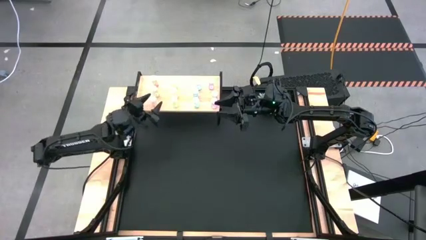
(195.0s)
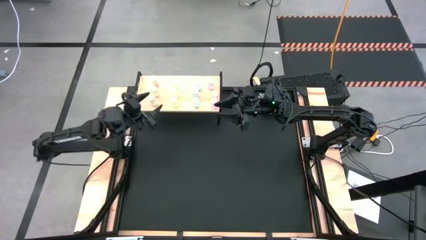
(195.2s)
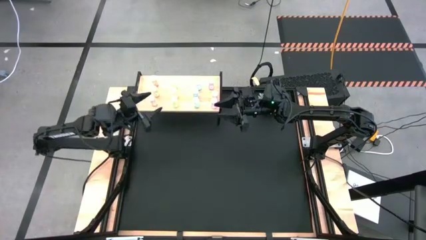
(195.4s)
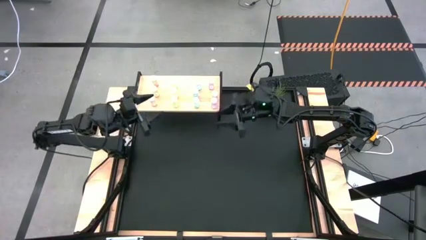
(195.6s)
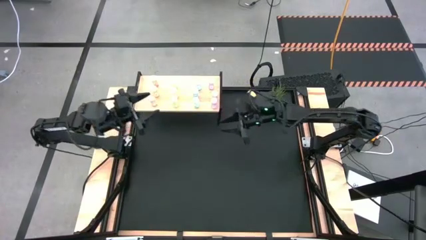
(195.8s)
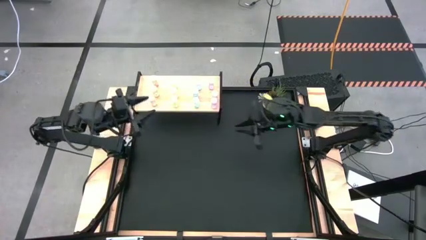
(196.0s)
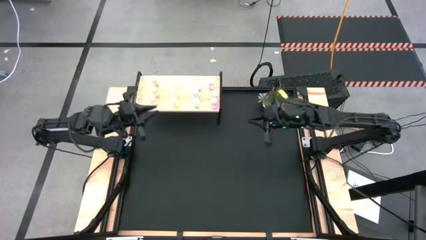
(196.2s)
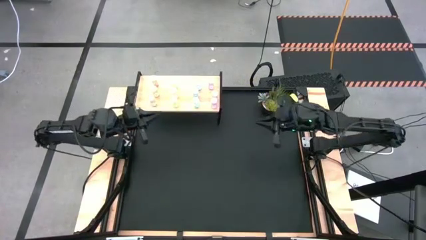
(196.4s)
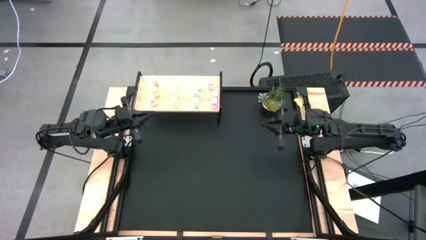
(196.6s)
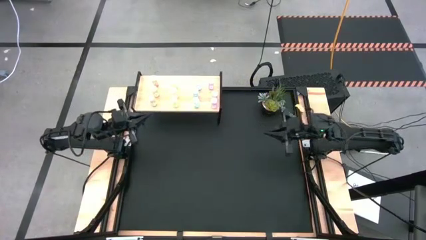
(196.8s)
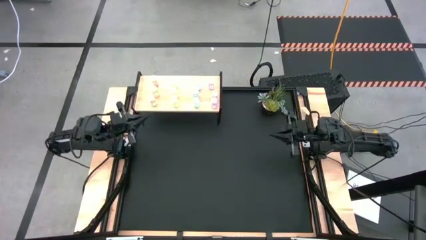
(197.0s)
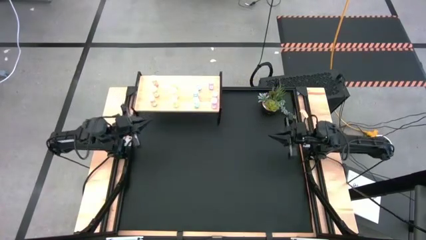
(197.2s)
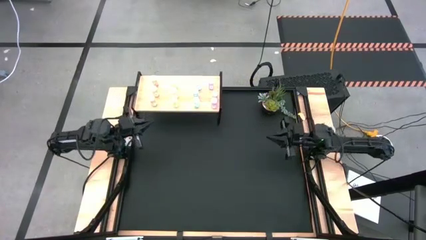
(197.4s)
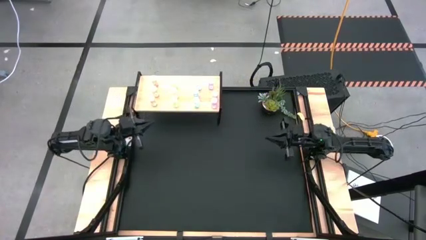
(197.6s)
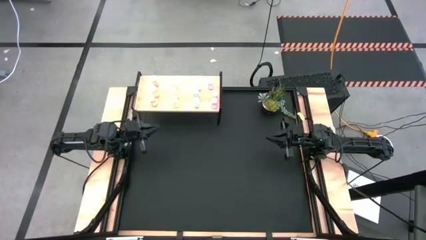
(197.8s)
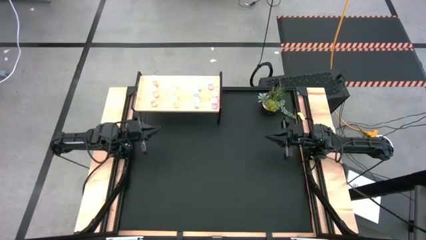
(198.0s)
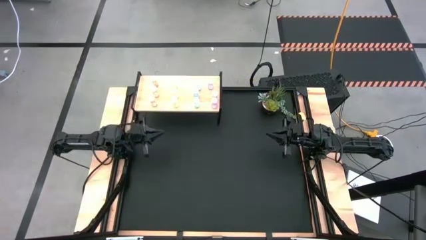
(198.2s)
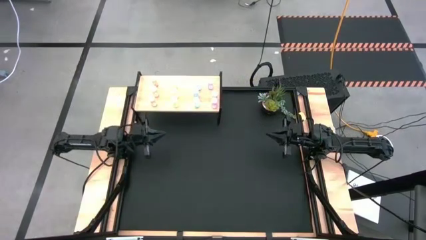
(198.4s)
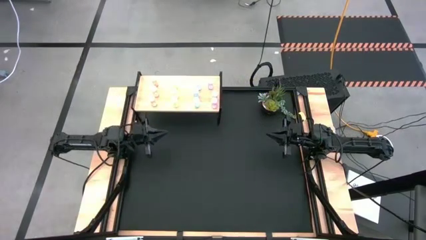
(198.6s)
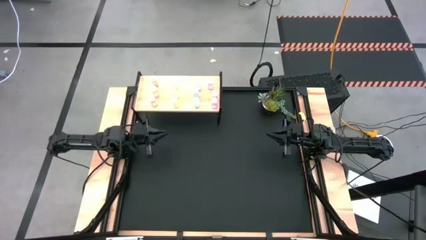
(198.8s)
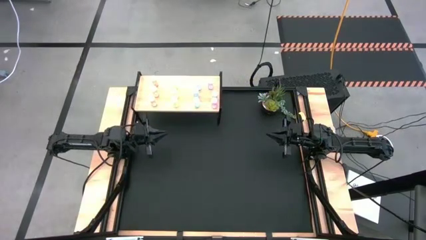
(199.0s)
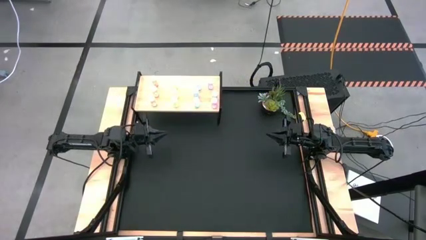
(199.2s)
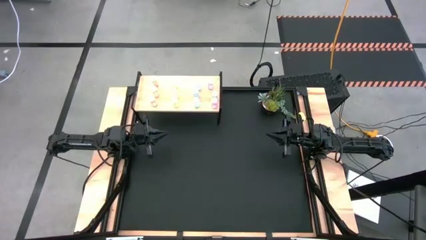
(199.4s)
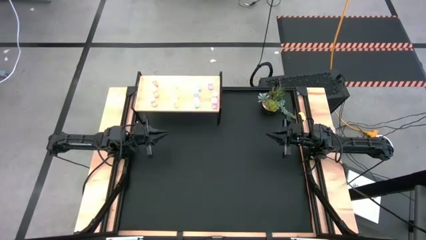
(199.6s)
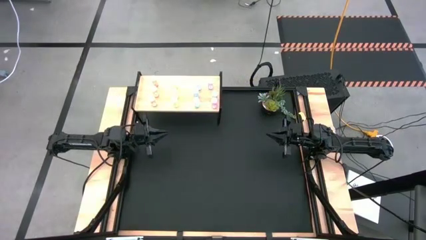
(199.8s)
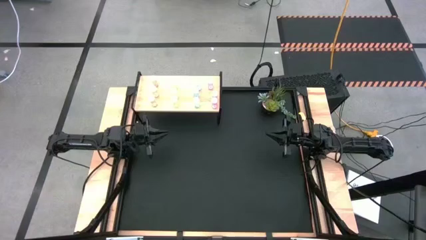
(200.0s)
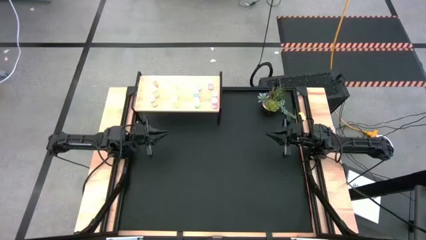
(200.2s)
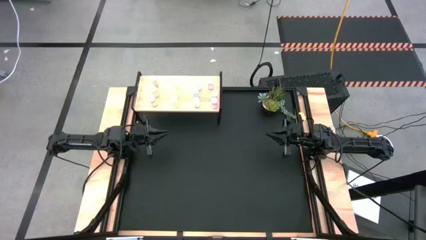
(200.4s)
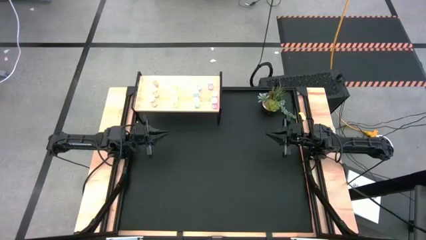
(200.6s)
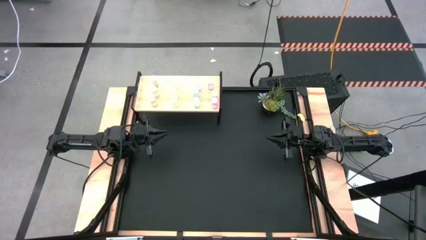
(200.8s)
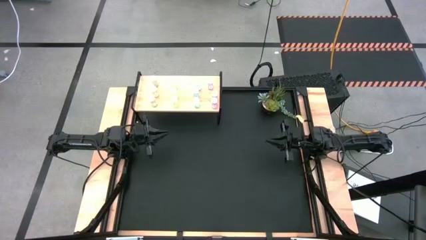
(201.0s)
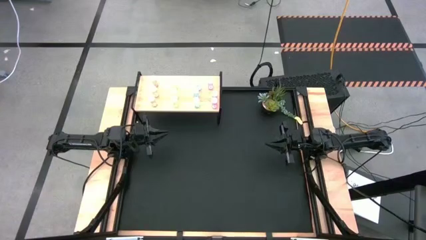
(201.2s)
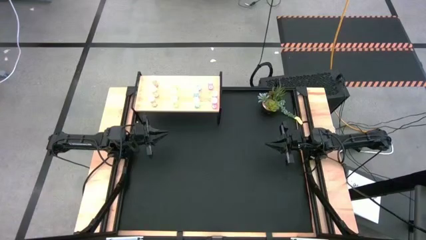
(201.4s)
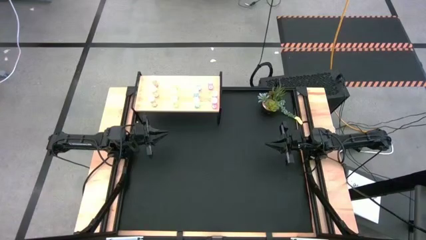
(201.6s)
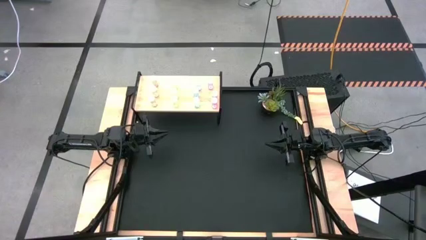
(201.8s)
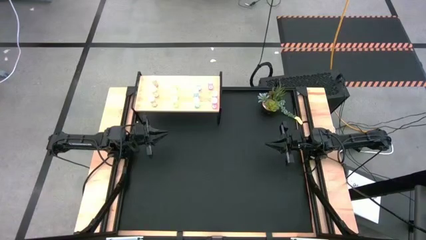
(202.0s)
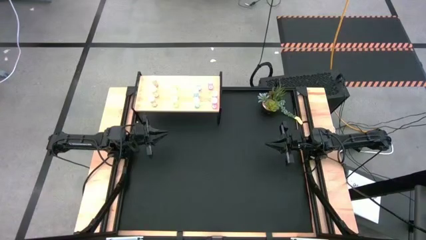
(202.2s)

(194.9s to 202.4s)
Task: Pick and place medicine bottles onto shelf by color
Return to Home Position

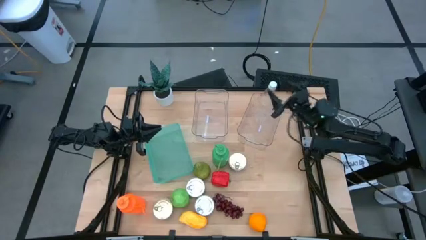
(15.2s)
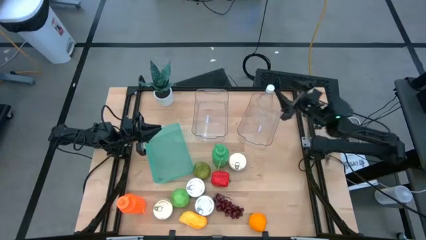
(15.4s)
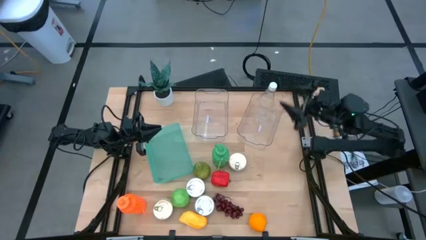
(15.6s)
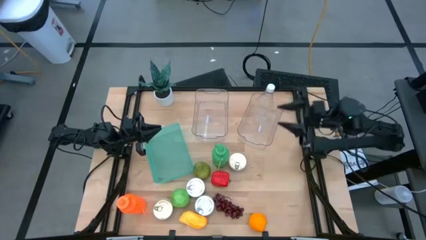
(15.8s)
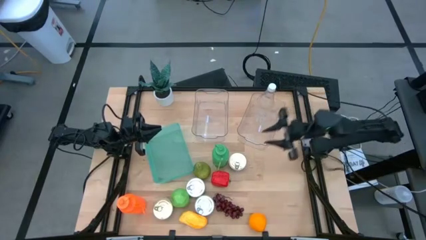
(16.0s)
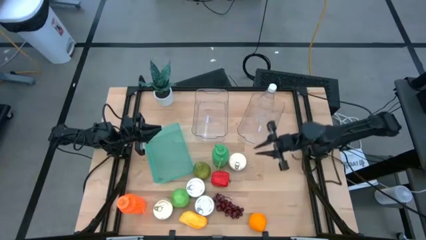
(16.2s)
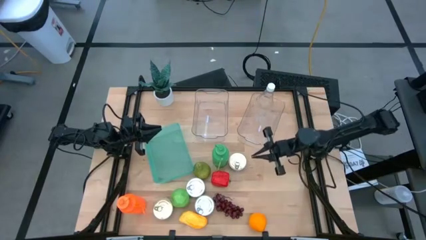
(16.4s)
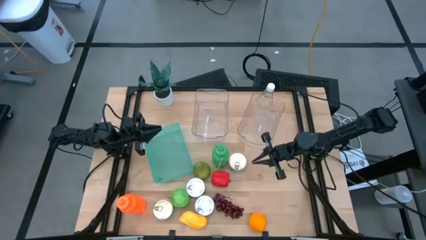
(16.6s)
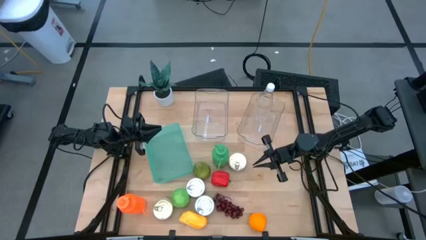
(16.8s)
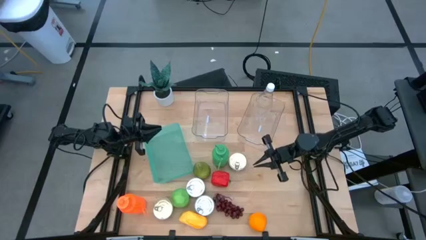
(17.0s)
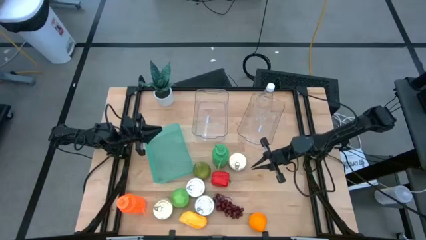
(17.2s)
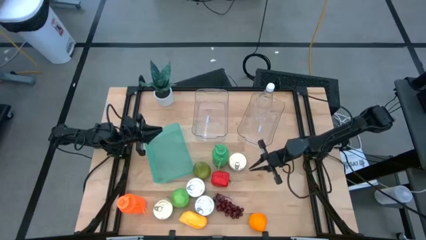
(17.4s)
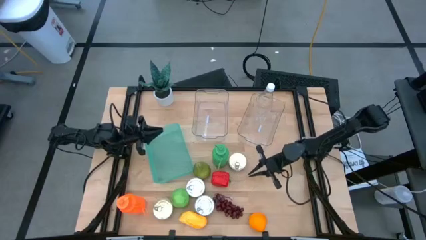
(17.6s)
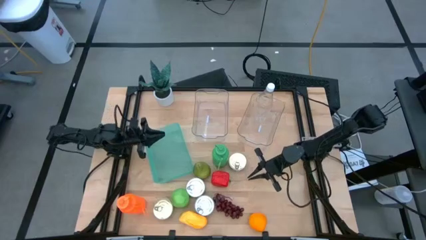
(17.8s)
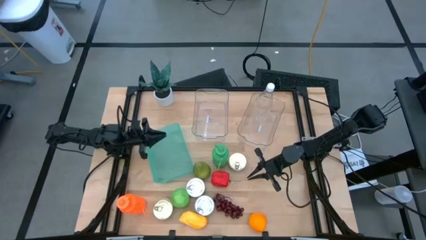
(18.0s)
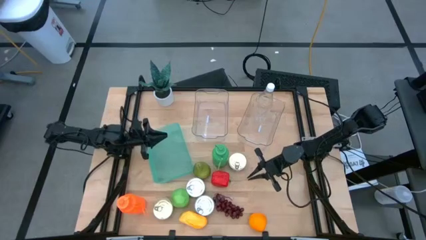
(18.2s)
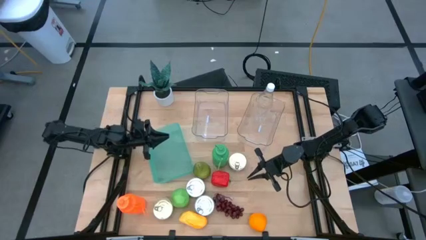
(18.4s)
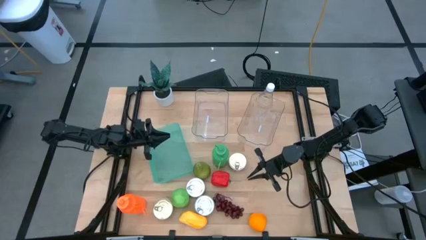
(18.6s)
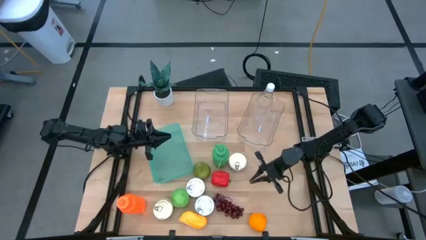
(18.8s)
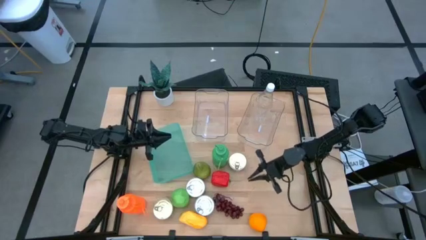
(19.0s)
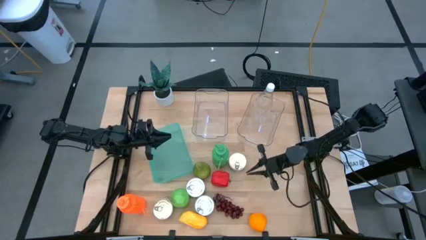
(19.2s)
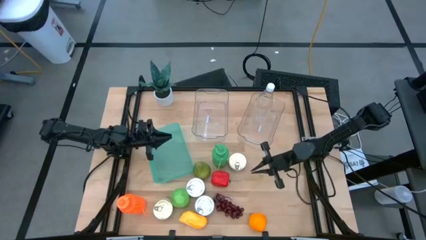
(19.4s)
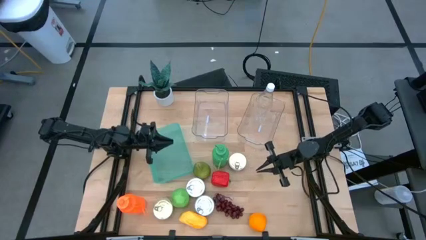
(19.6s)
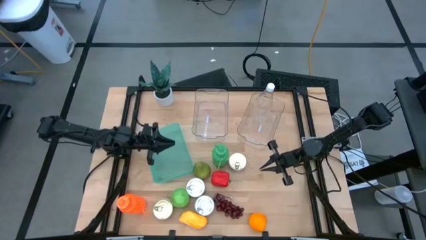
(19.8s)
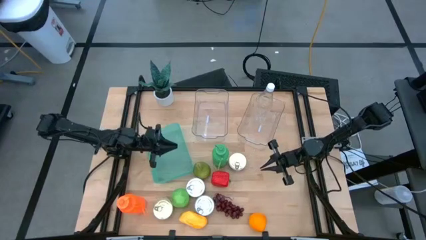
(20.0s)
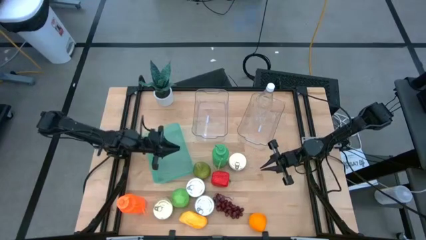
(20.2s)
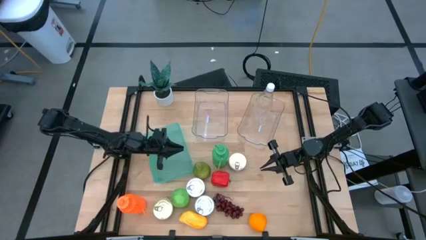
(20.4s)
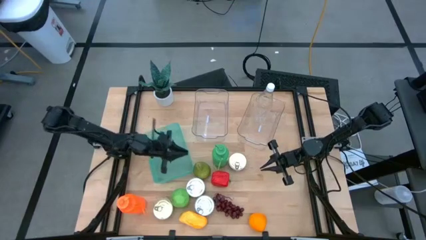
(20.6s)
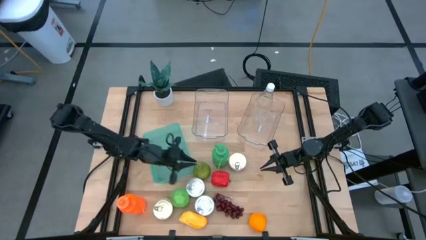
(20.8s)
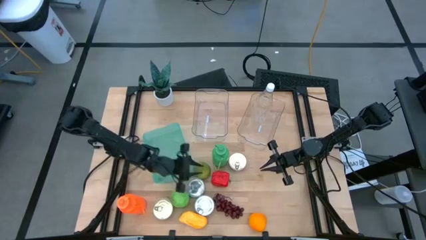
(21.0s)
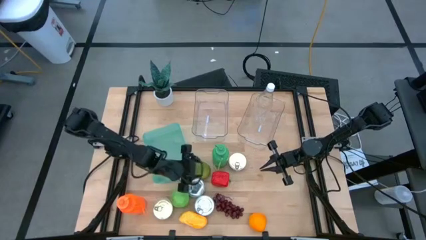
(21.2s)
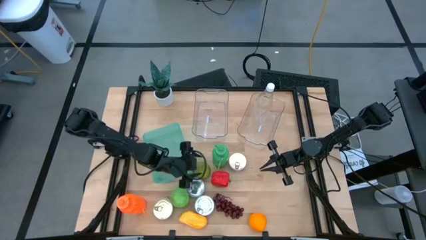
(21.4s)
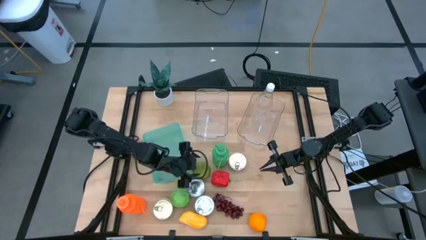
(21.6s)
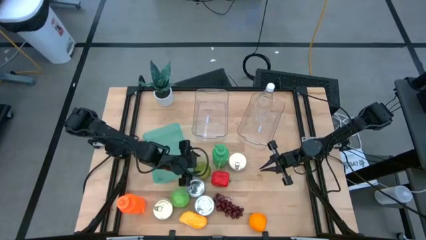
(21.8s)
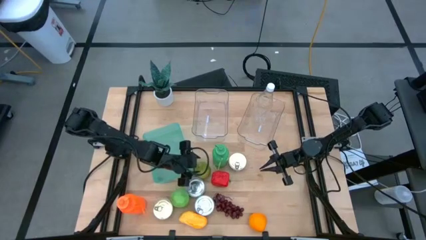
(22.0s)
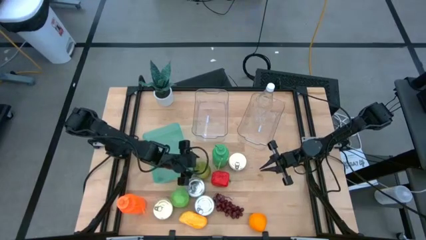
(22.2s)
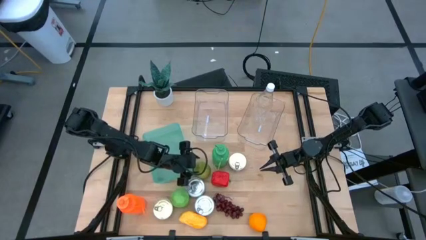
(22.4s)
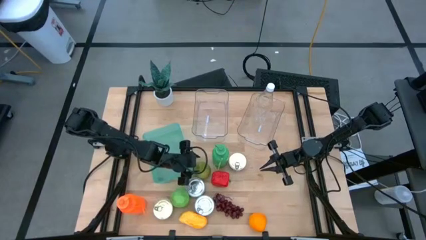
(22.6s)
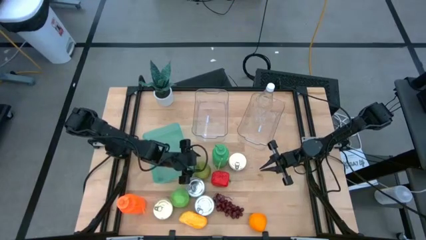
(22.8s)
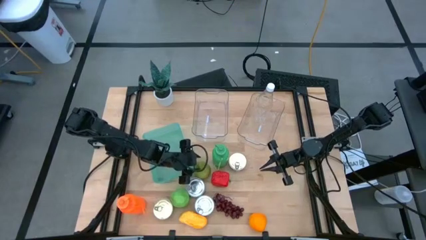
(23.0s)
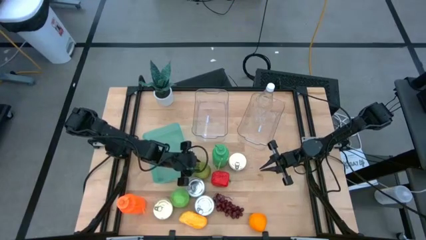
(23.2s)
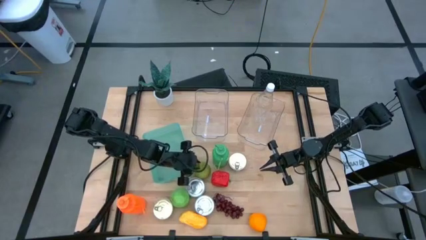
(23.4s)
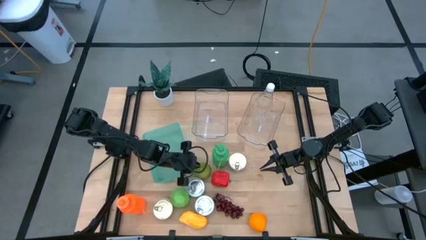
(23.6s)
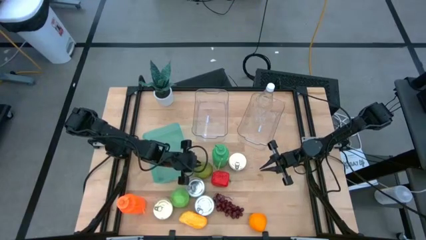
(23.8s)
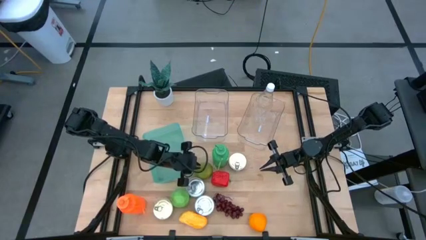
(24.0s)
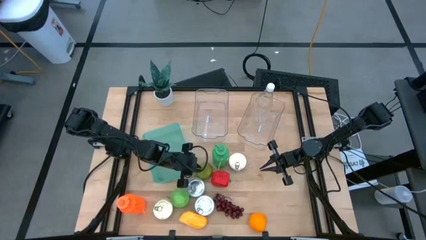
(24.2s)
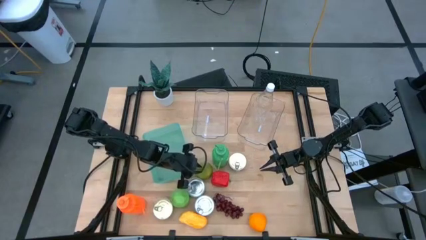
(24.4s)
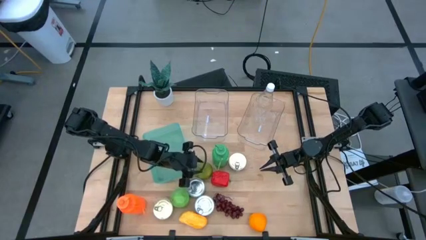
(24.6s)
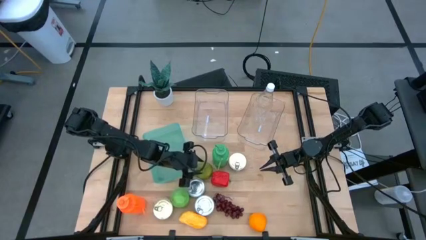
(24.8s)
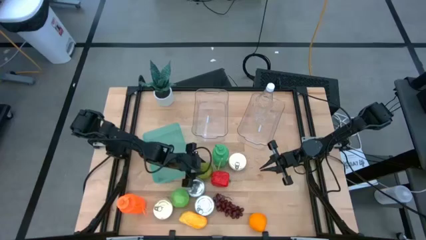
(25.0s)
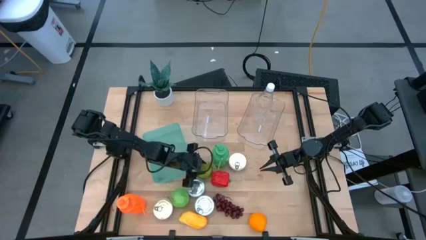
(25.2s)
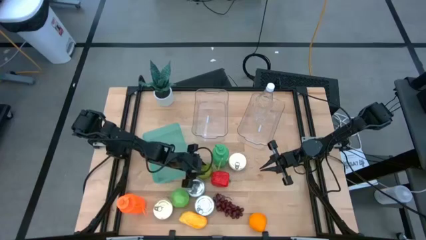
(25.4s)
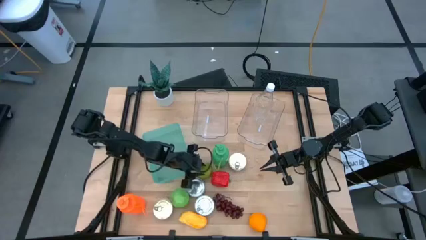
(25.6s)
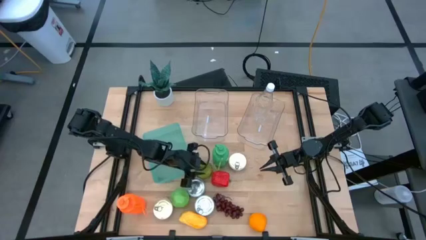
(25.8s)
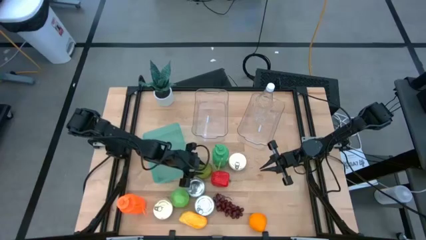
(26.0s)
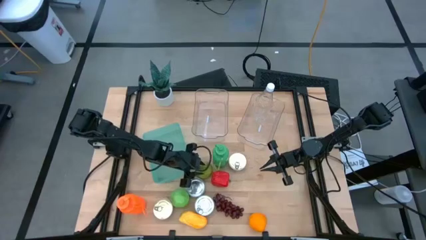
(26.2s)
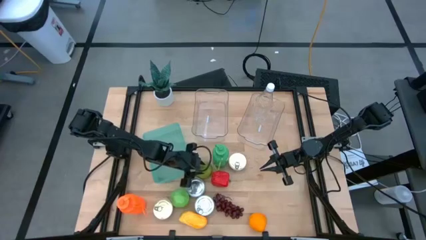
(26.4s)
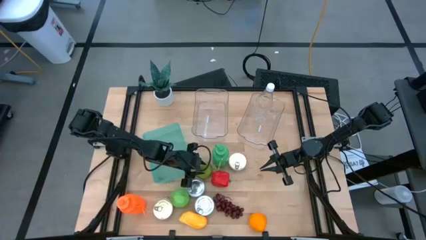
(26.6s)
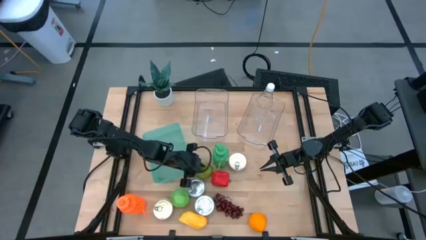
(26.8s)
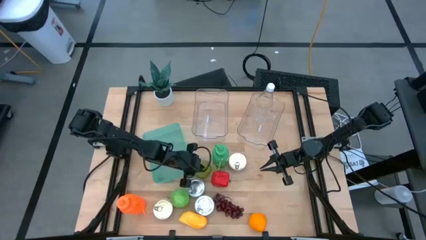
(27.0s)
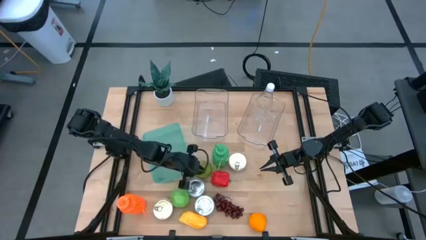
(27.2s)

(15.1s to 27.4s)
Task: Pick & Place Food Item
Put the pear into the left transparent bin
